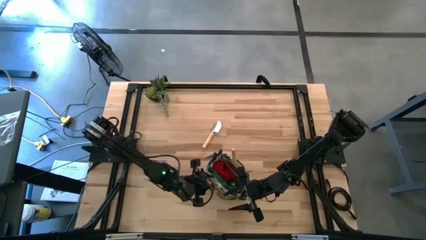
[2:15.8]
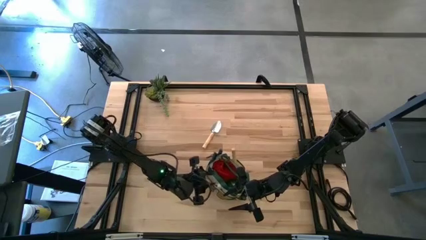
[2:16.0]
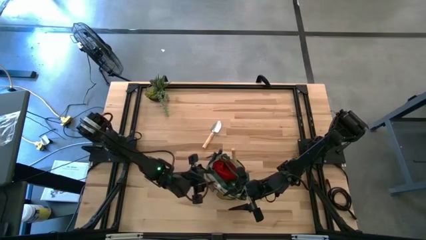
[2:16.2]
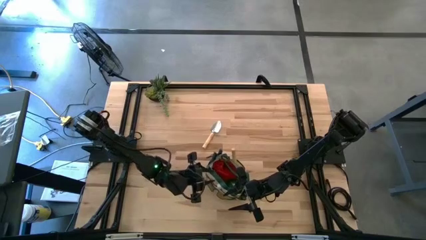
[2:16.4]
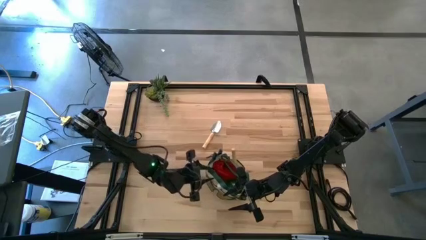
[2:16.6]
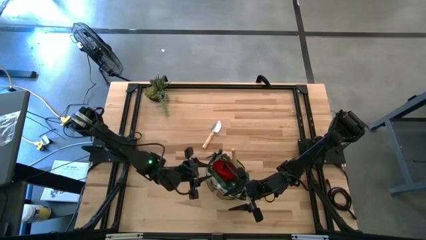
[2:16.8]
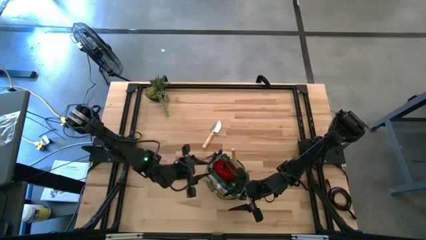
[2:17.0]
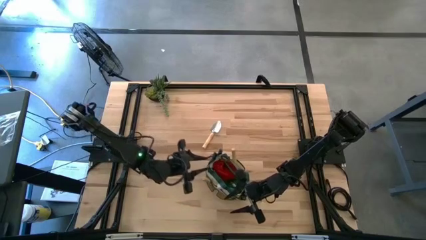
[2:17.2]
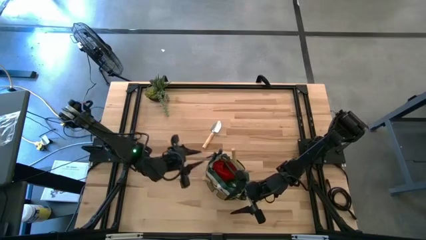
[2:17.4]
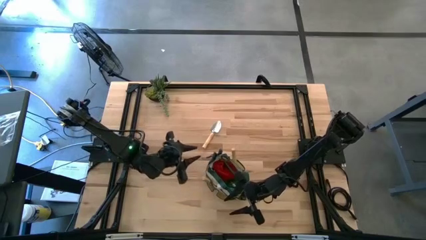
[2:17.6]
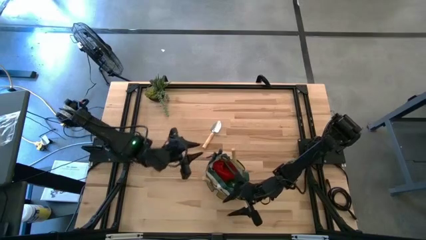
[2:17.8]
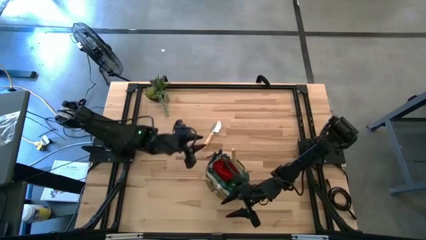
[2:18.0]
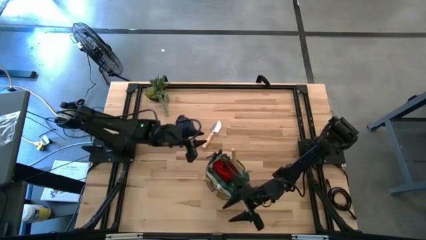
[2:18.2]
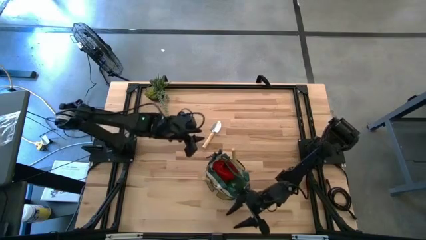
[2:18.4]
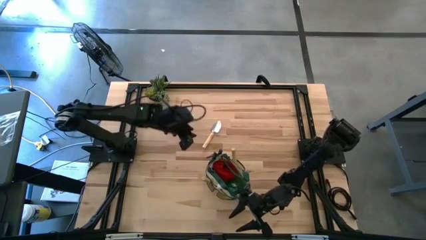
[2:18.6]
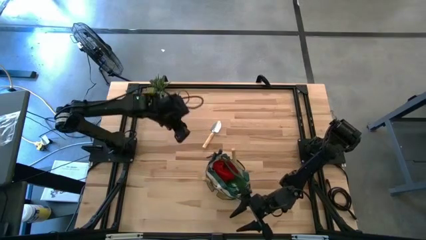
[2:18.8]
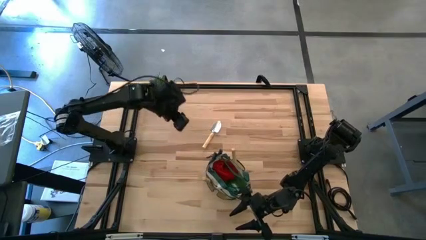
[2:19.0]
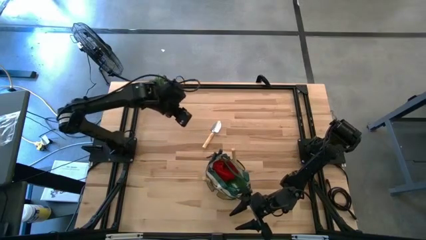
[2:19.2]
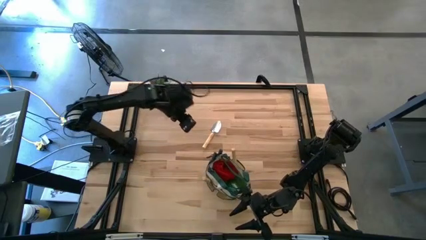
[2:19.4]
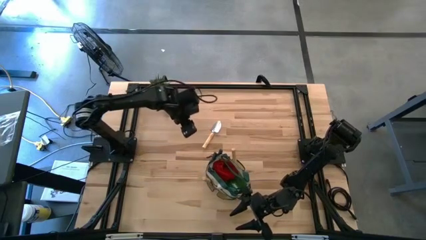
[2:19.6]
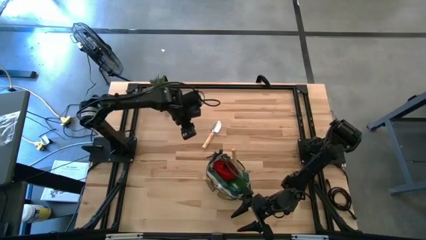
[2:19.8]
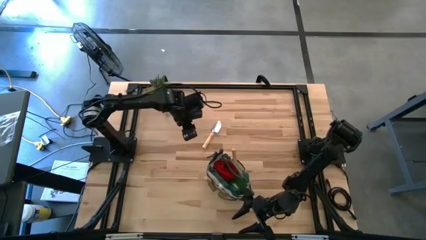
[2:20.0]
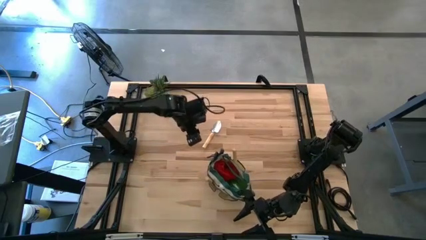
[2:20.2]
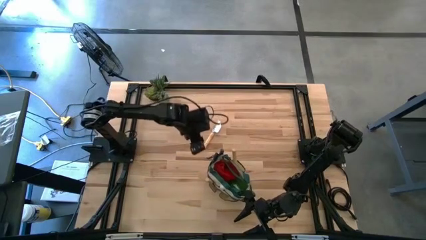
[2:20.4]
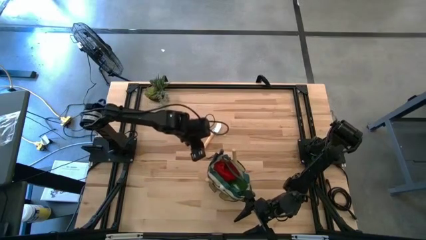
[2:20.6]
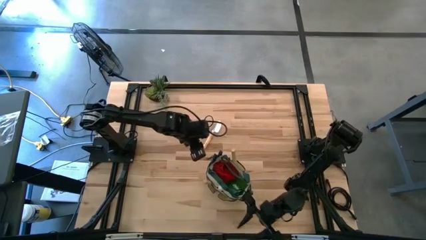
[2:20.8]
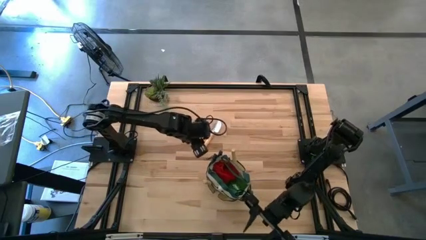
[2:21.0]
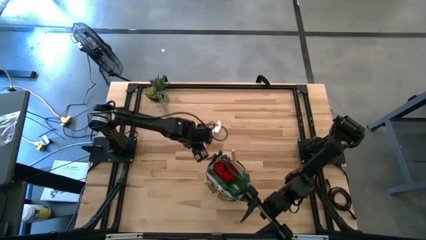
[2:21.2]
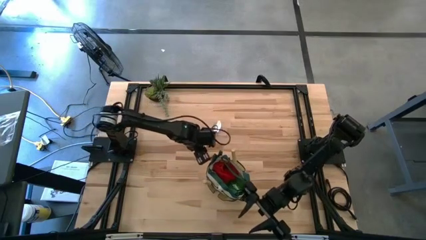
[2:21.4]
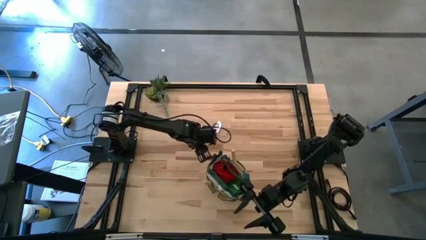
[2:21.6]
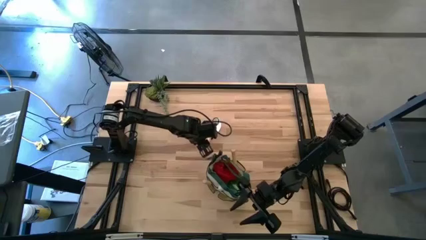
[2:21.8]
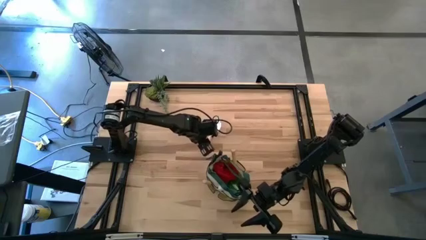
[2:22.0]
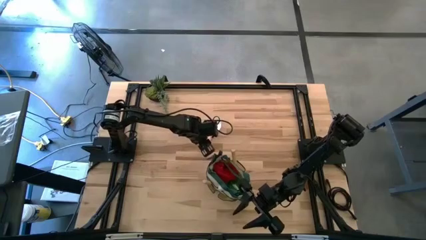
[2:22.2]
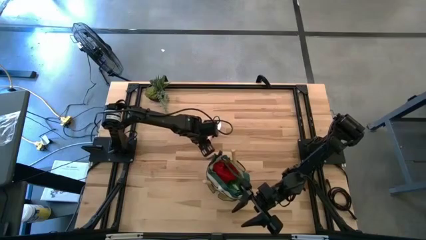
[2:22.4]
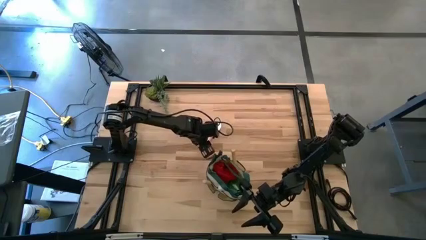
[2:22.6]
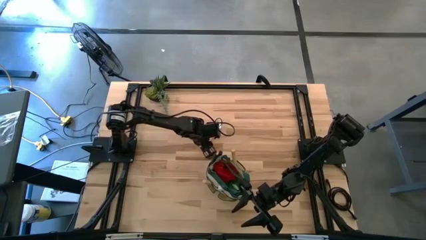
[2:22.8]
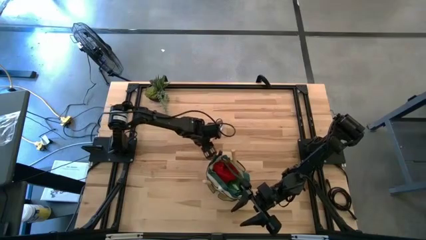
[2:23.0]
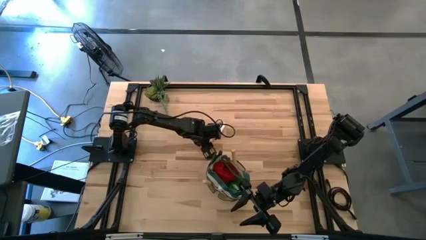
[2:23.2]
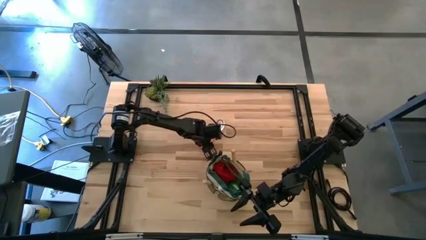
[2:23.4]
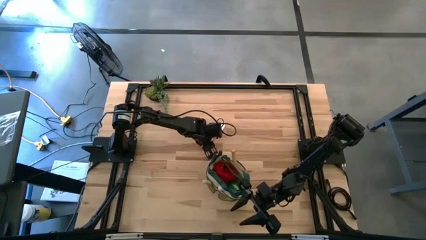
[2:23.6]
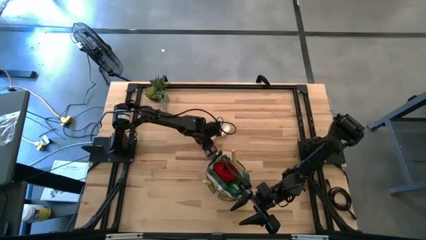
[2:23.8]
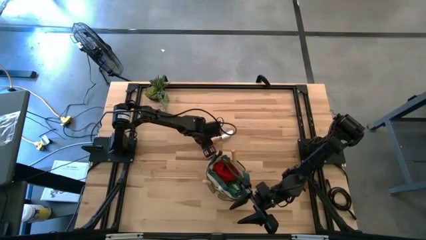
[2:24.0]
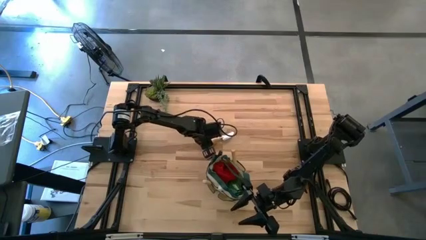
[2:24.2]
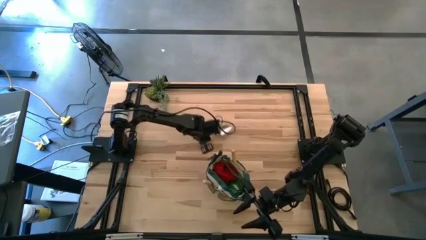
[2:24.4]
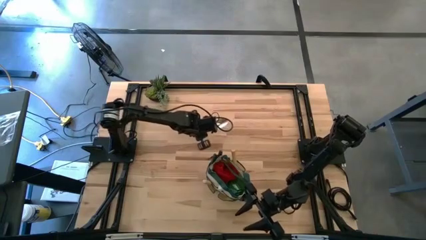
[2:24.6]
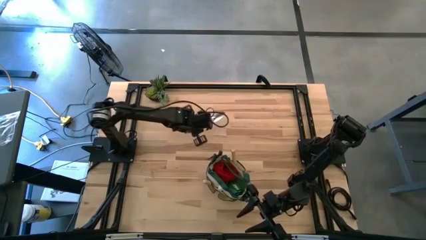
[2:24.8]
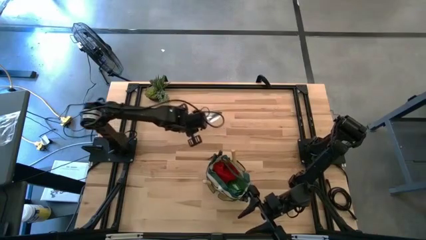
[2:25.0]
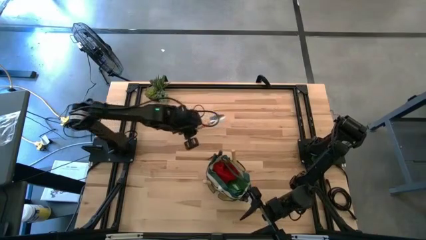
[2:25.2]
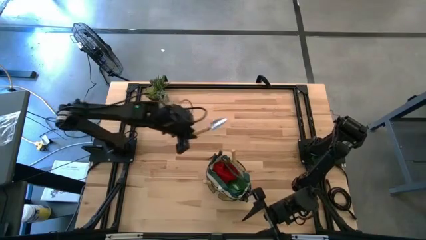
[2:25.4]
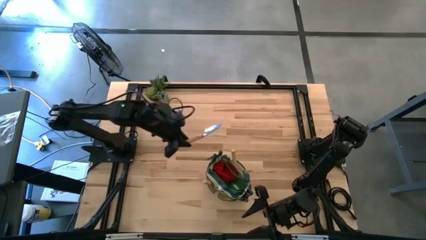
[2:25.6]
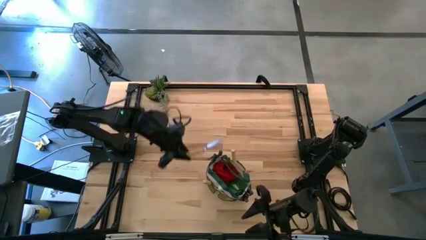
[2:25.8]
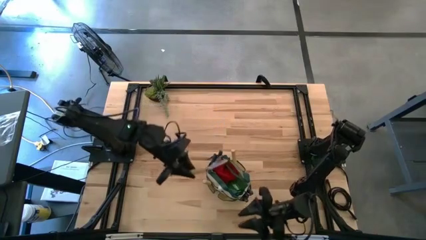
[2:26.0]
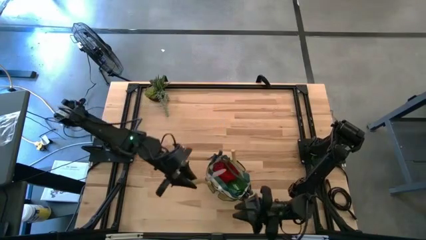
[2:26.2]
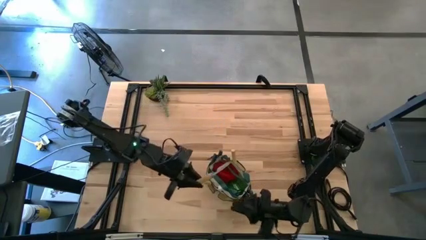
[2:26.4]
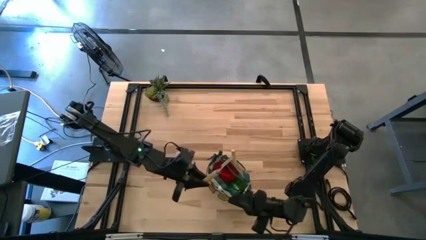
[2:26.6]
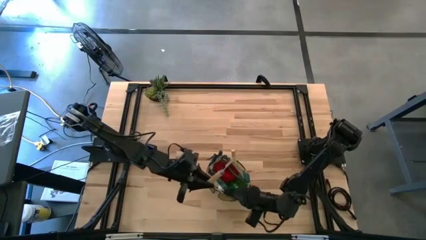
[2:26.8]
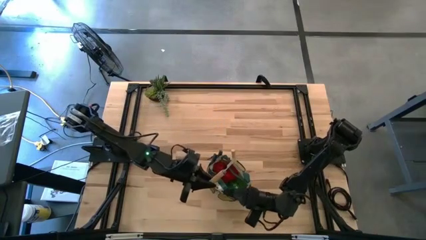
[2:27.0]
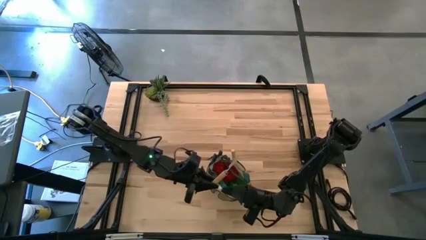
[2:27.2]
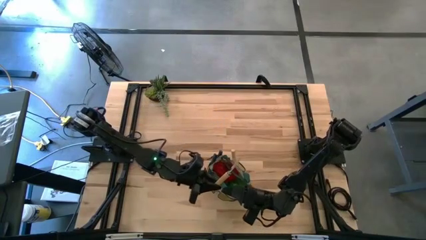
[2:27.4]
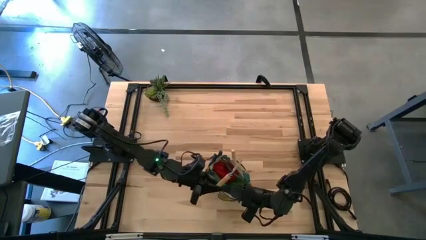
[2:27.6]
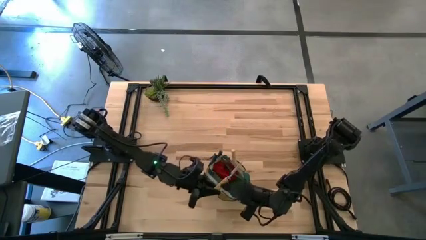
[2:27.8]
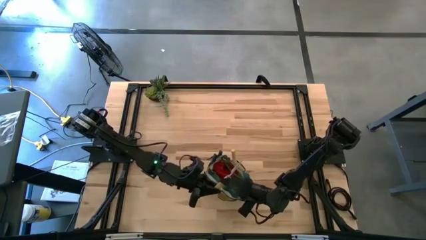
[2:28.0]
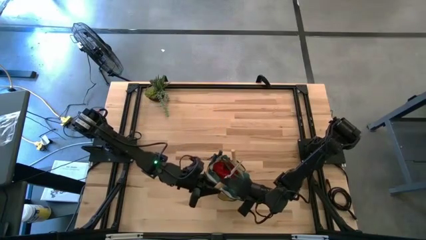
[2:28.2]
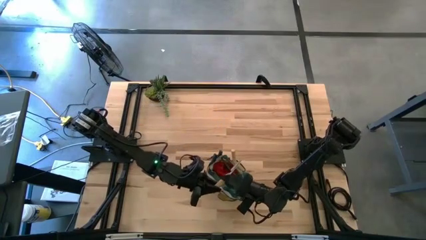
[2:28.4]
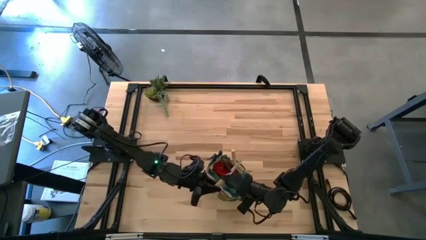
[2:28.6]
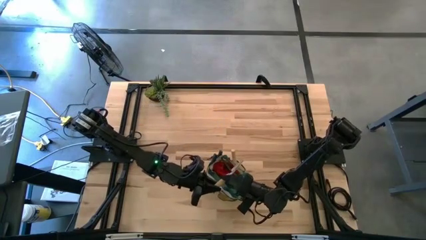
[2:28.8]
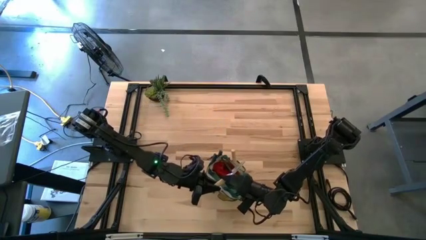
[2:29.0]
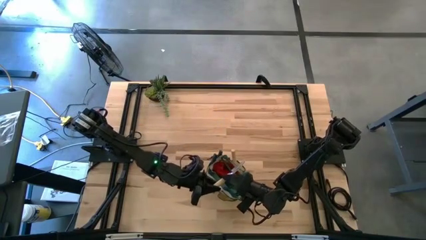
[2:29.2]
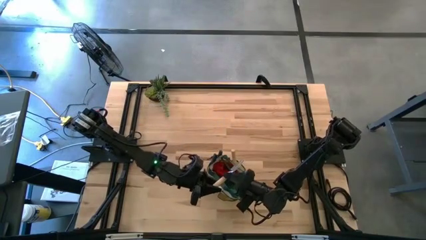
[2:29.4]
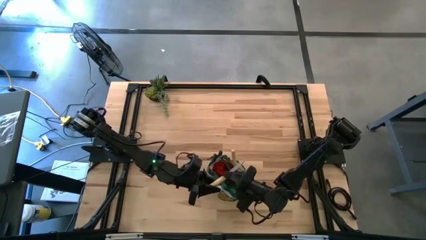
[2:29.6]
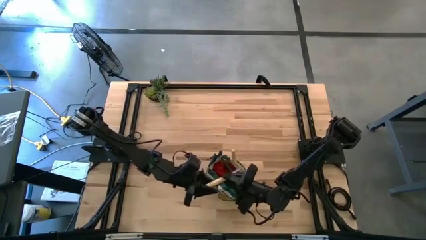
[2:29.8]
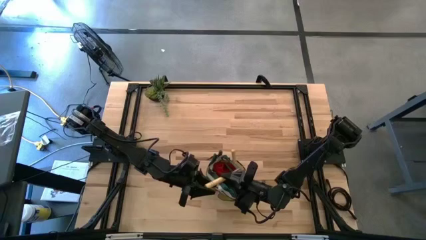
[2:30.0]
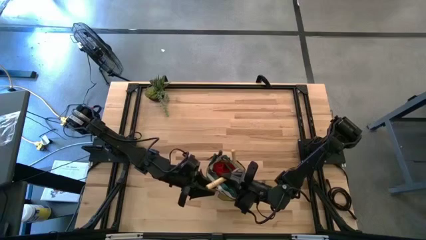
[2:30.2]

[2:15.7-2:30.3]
Task: Pick & Place Garden tools in Gardening bag
Put the trowel into the light brown gardening bag

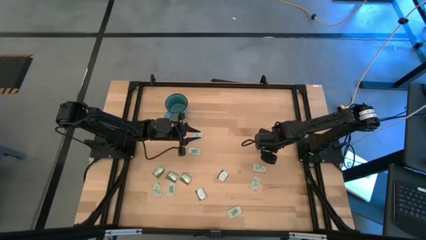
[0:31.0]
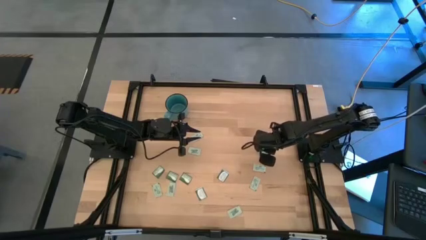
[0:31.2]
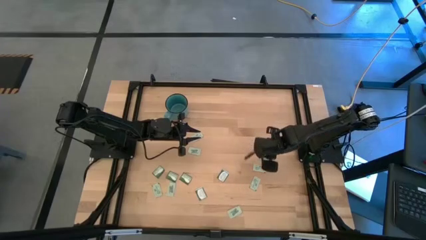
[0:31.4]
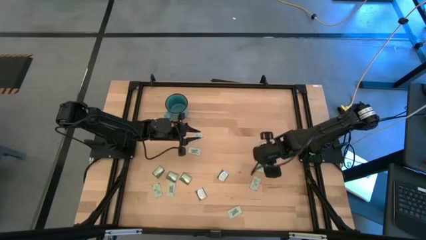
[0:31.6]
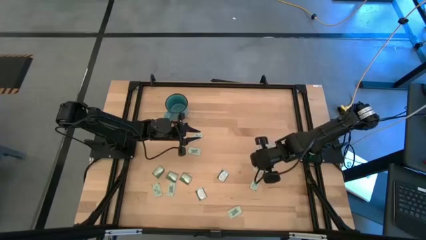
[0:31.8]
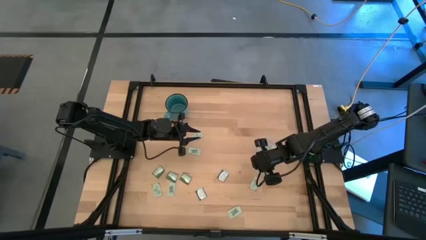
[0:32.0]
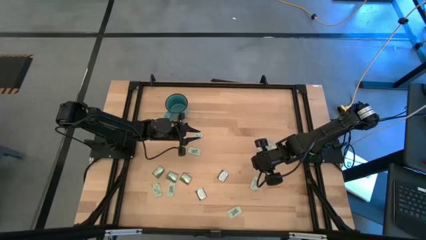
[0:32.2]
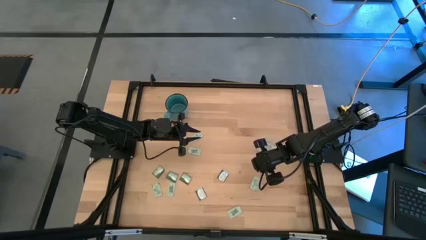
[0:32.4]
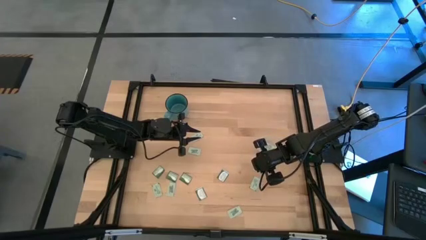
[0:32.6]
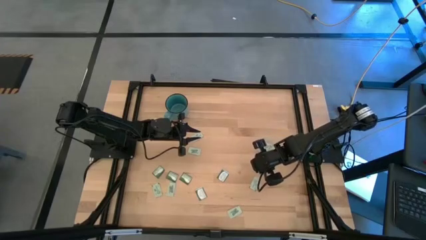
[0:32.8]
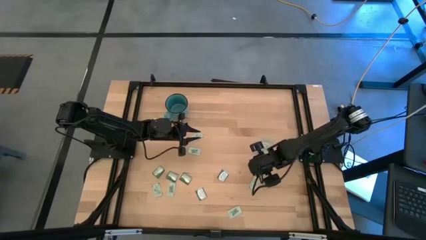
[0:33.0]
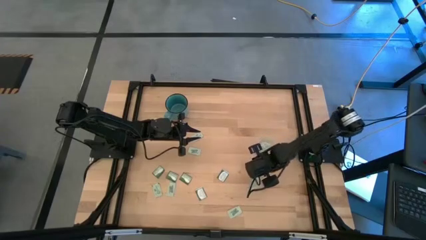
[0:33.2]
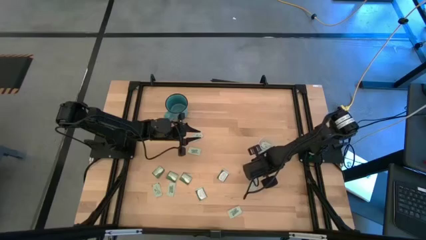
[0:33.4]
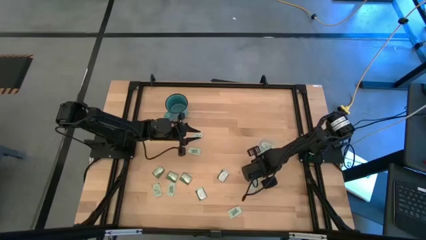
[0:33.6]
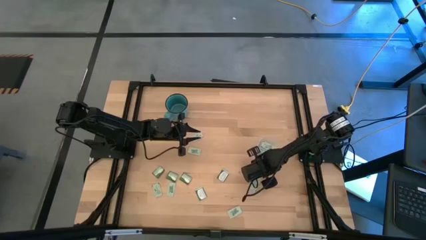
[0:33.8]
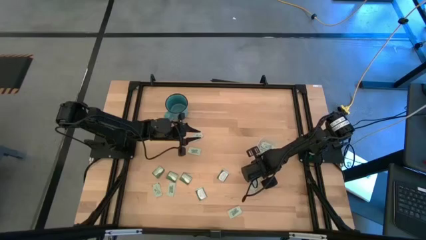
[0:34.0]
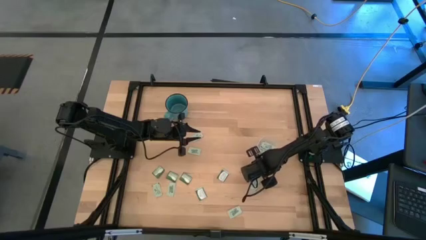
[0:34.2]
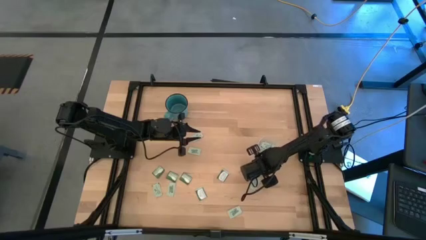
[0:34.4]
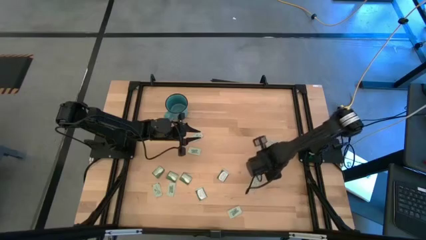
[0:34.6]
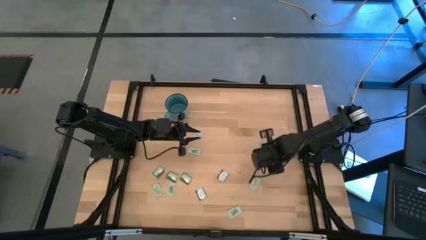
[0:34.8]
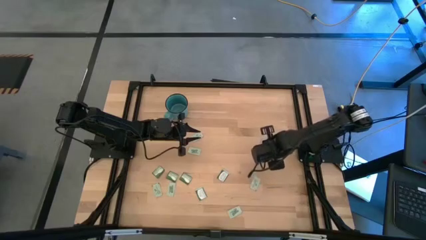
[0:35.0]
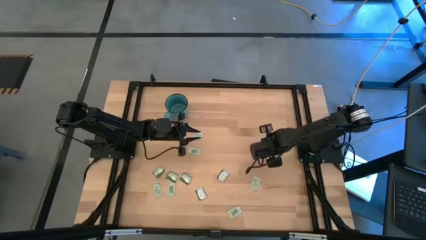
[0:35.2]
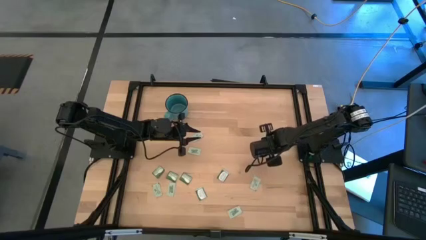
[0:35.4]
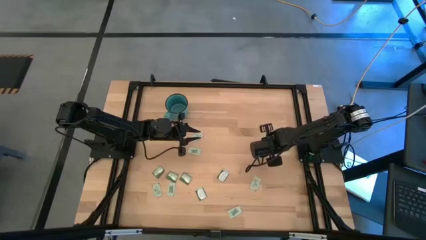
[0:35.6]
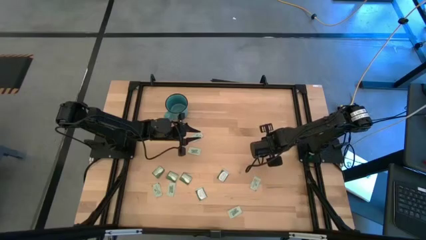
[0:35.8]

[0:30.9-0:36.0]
Task: Pick and place Stevia / Truvia into bins
Put the stevia packet into the transparent bin
